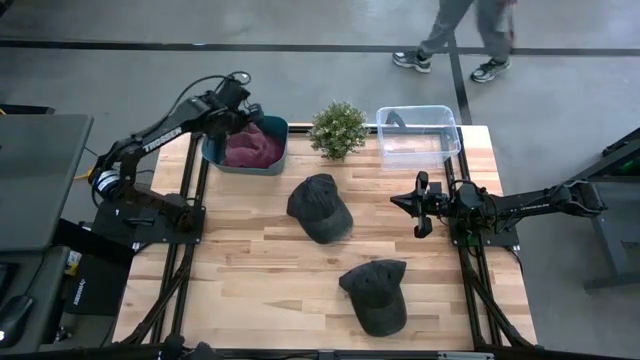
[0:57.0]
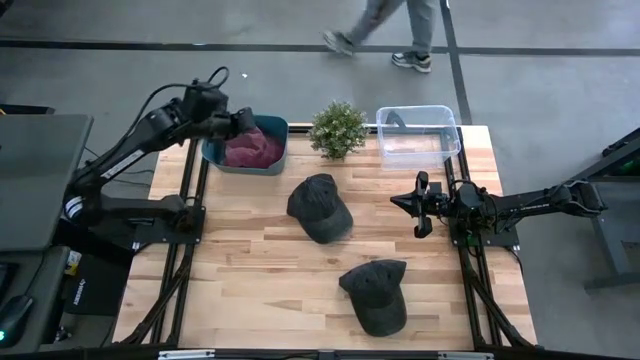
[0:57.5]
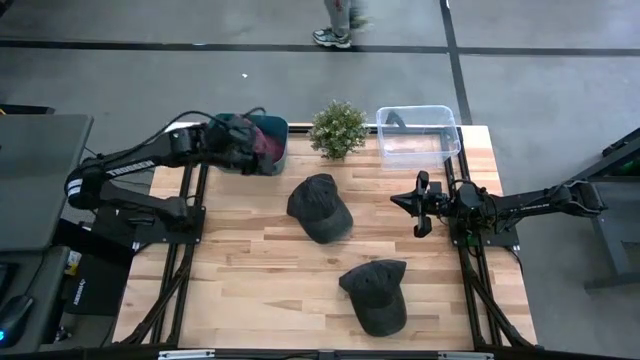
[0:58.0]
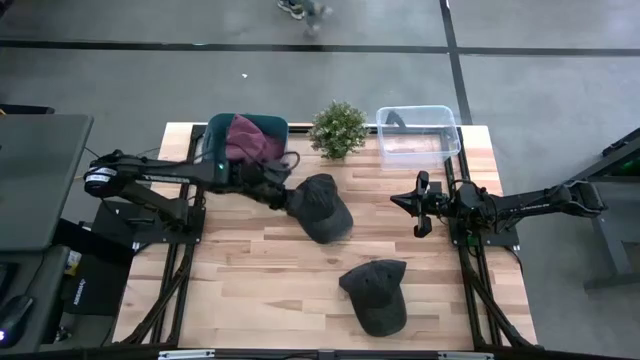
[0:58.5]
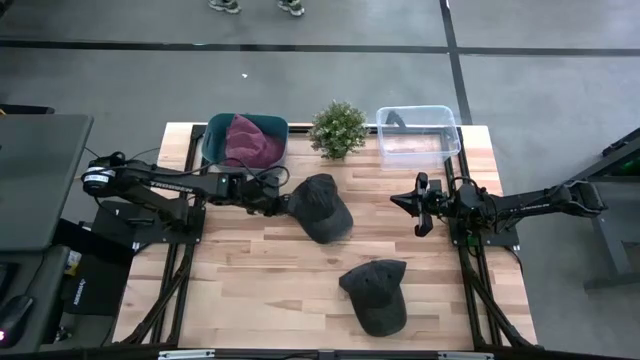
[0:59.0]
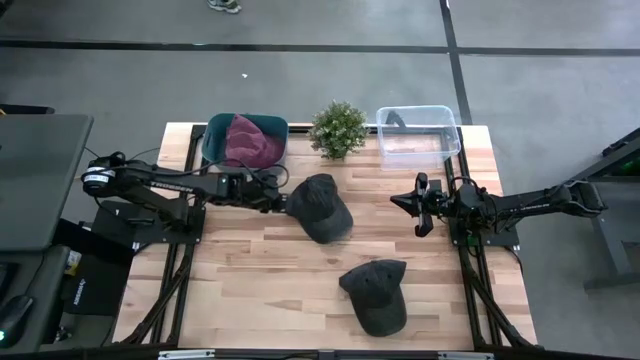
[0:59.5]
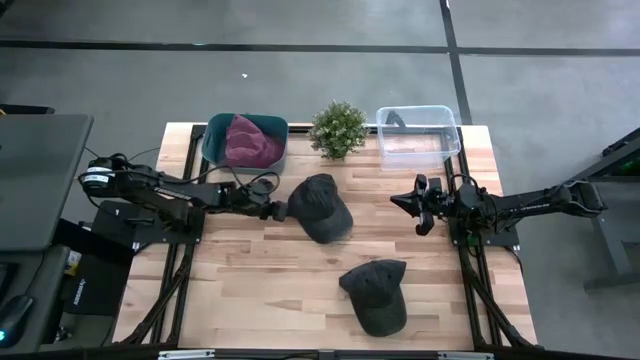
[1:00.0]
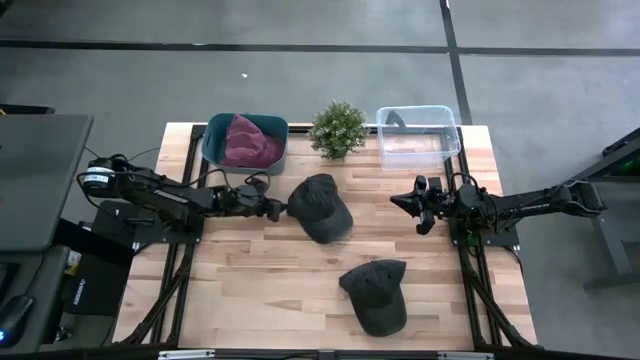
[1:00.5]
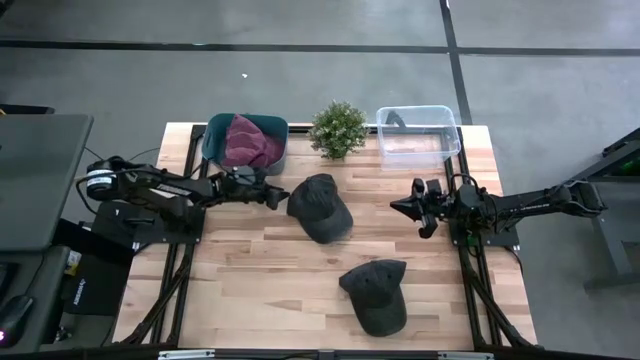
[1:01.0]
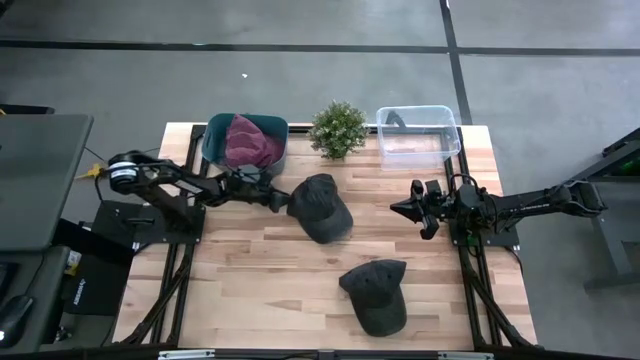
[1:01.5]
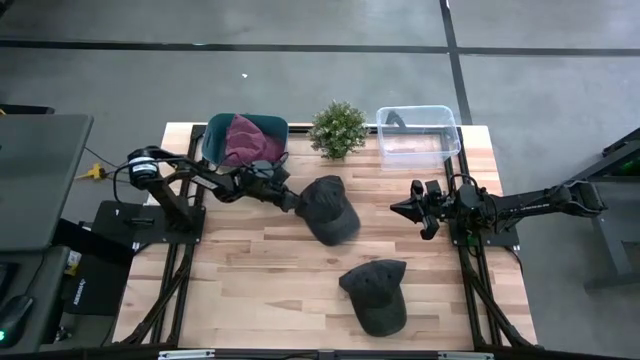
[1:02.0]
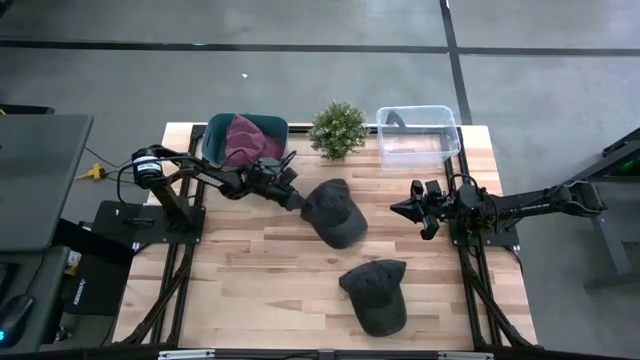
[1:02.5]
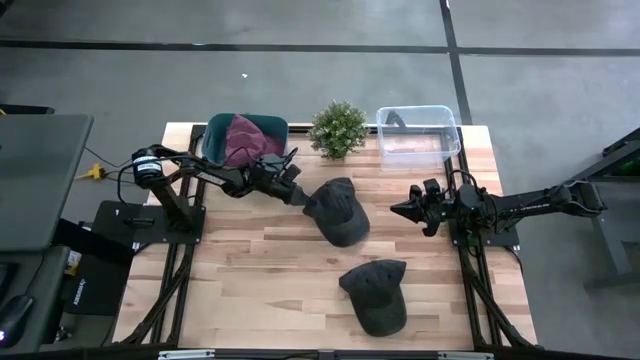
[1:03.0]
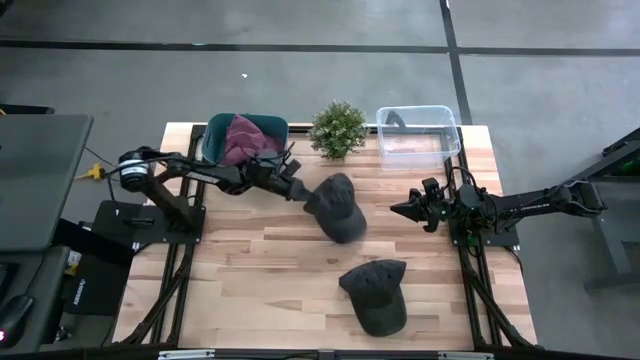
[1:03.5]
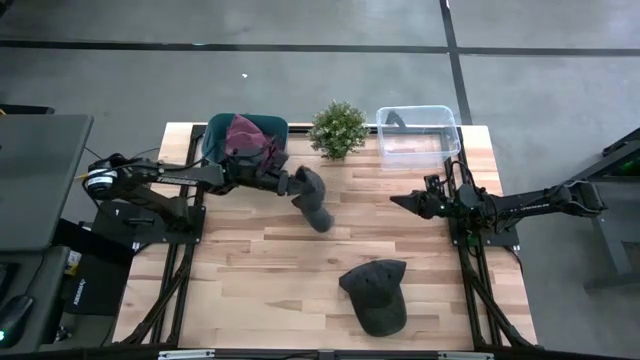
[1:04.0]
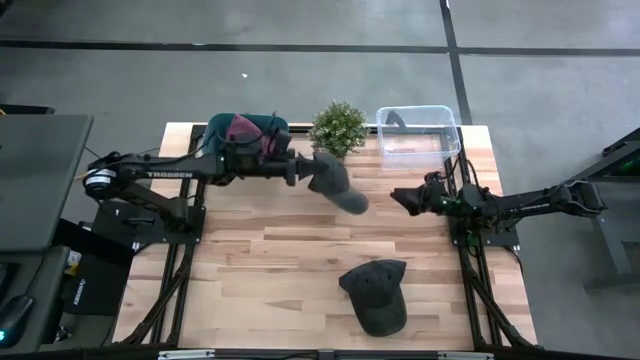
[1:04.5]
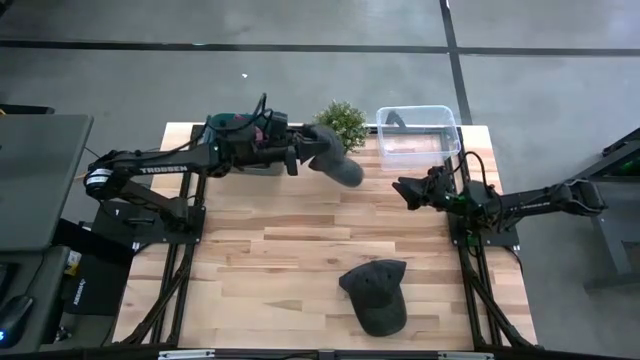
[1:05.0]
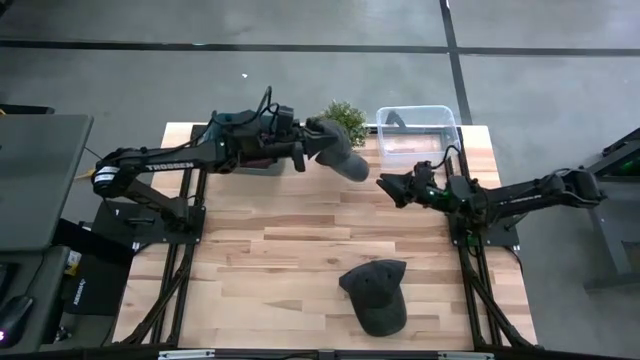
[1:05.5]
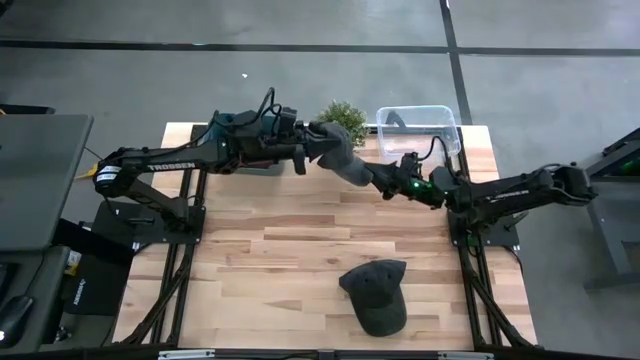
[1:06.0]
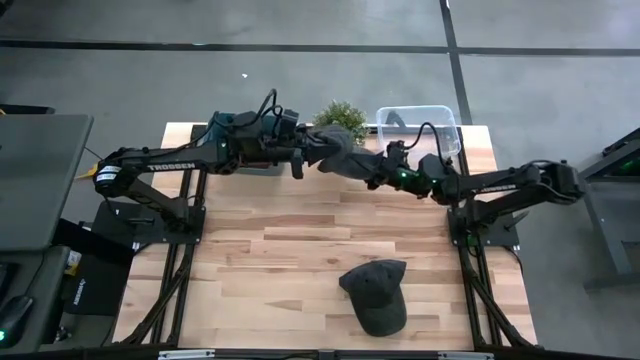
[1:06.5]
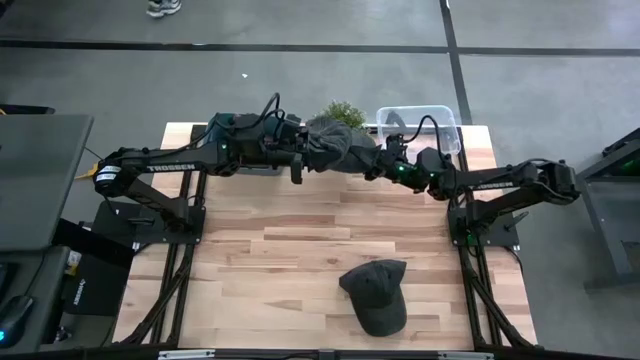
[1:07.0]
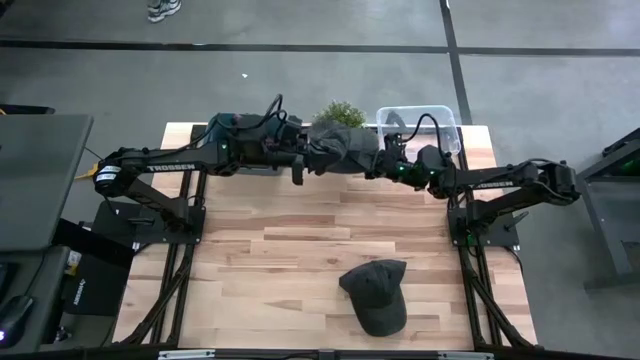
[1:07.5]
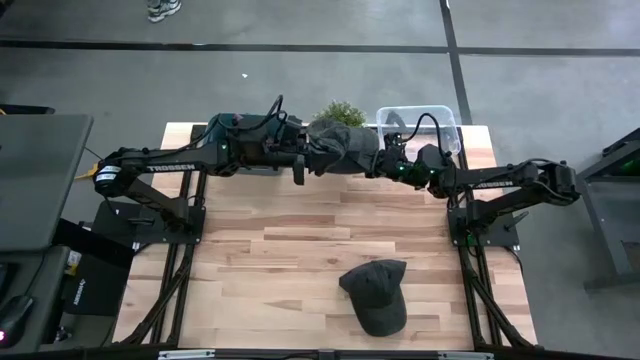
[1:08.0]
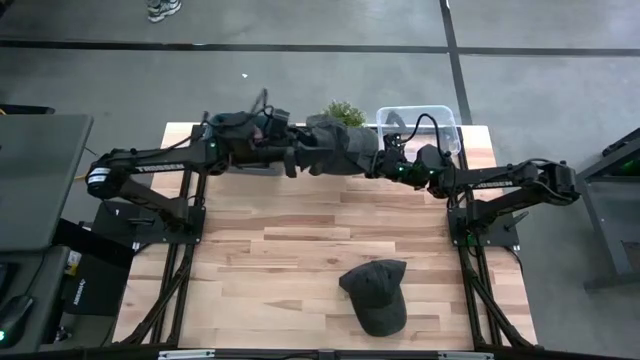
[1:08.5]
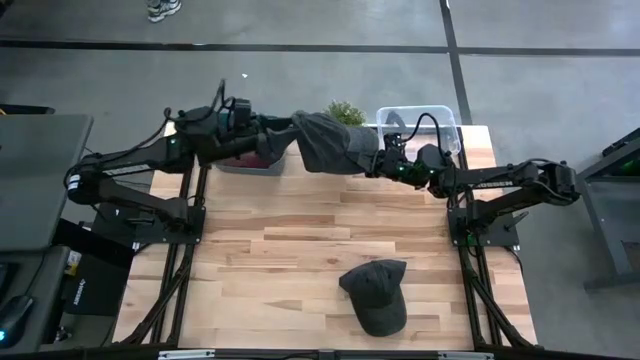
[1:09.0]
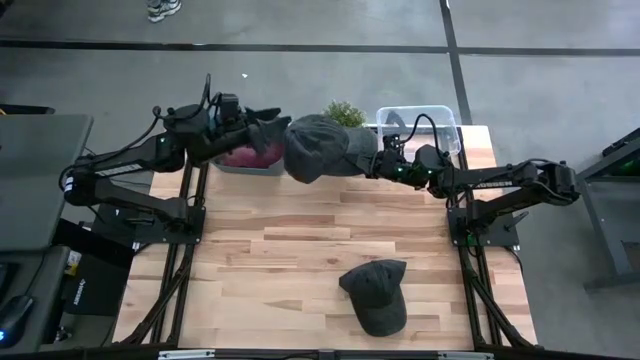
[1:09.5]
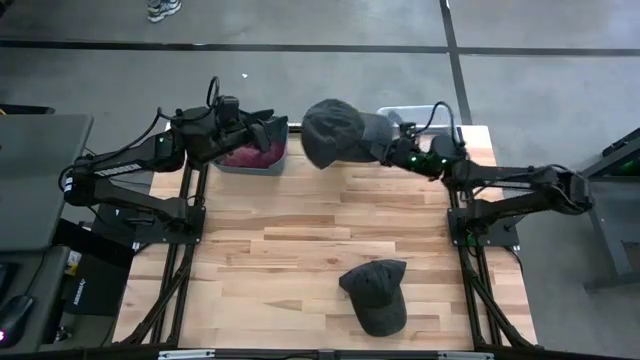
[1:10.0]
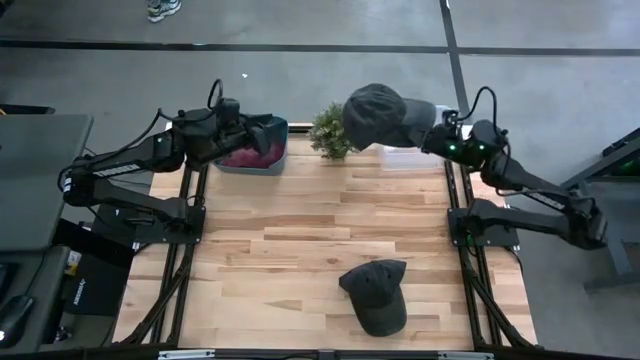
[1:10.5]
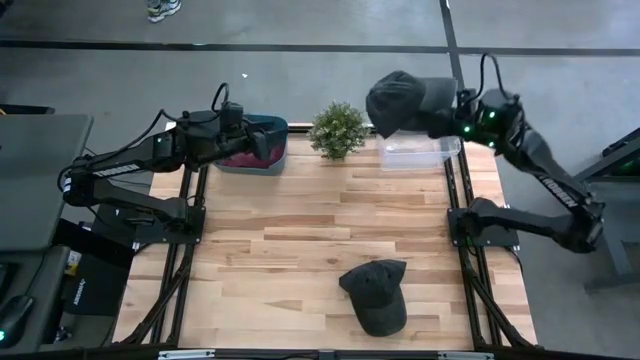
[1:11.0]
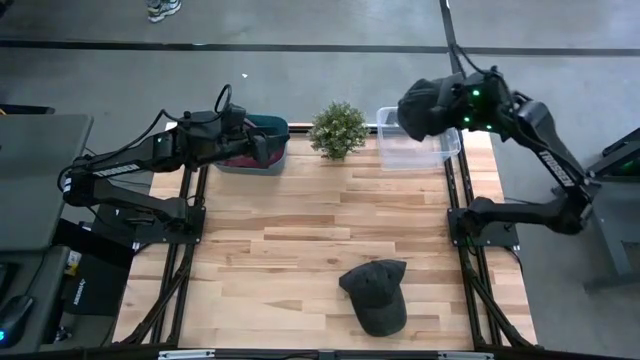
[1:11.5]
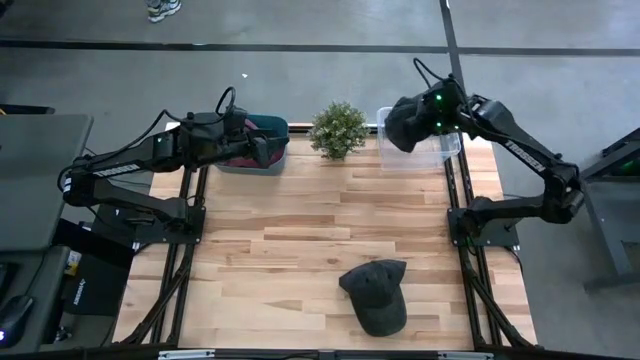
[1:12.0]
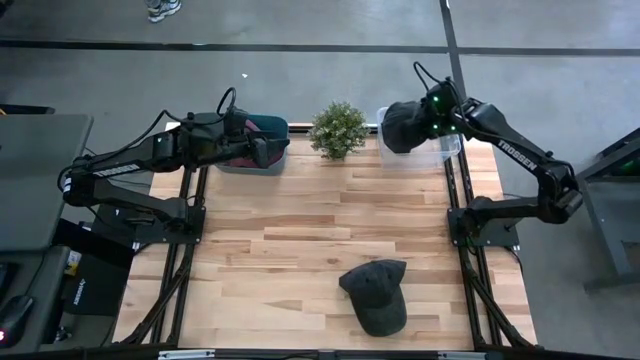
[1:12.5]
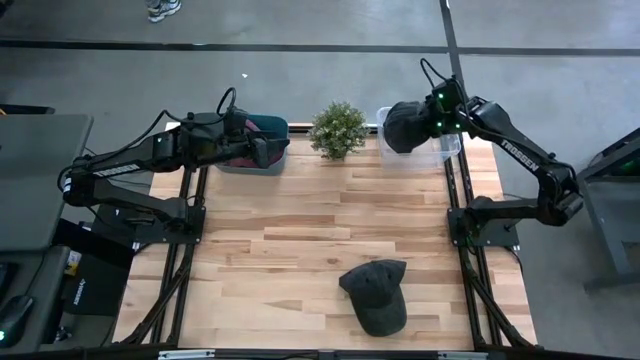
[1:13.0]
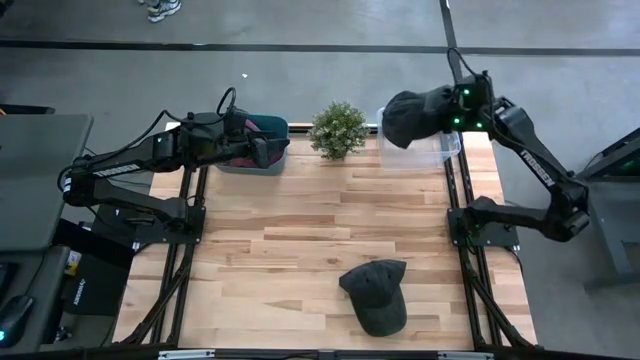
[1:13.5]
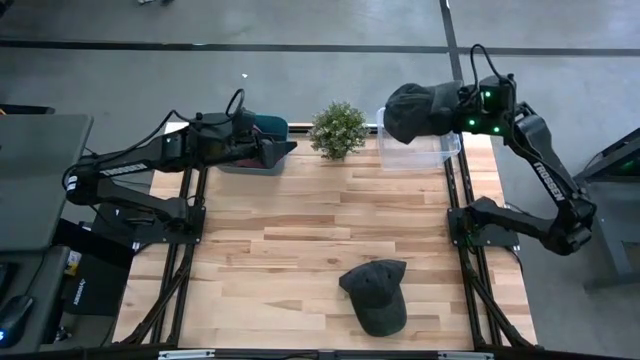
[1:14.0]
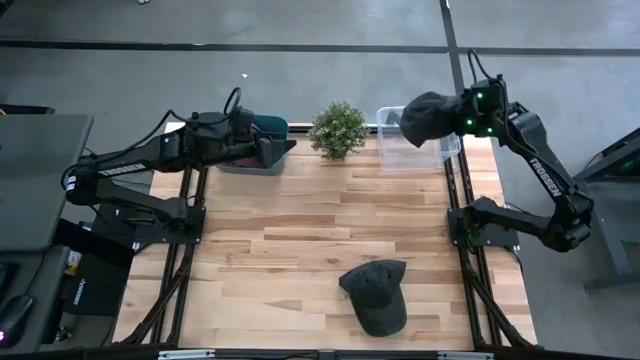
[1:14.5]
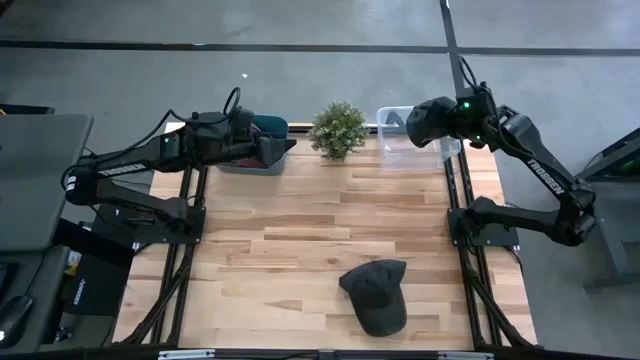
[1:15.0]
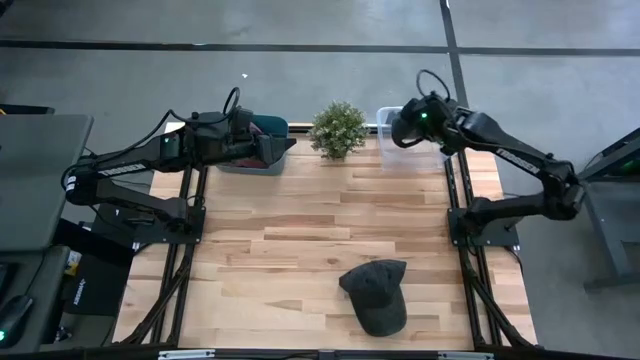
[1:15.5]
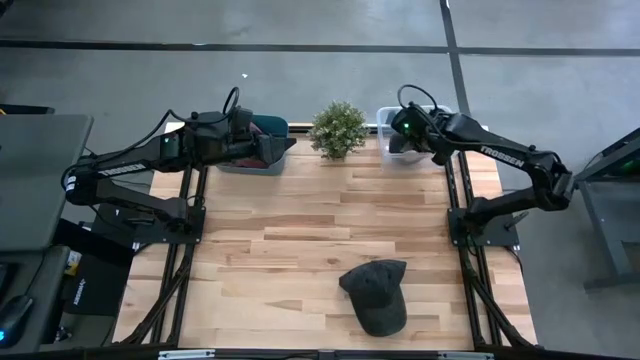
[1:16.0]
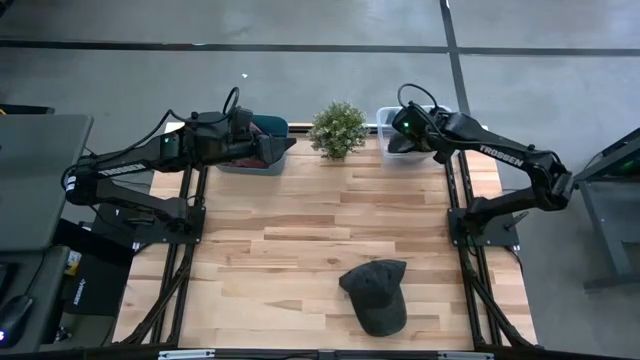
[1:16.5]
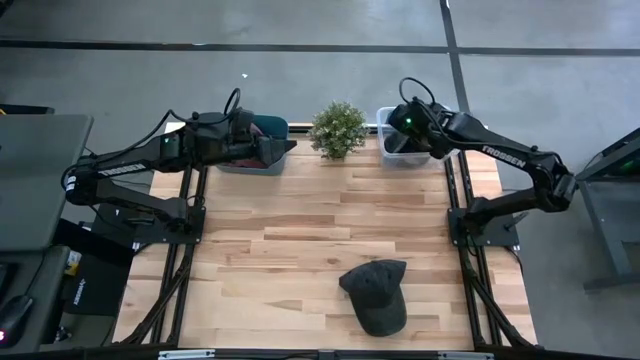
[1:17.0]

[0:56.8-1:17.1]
Task: Pick & Place hat
Put the top black cap into the transparent bin

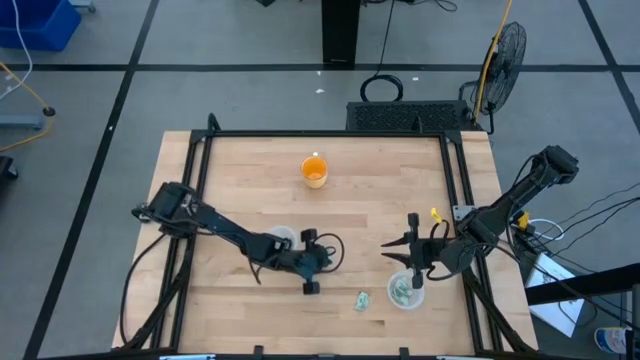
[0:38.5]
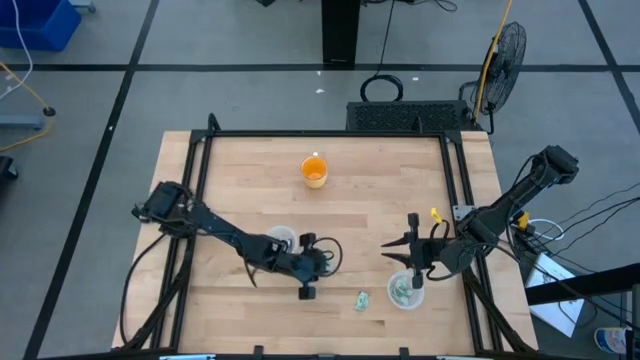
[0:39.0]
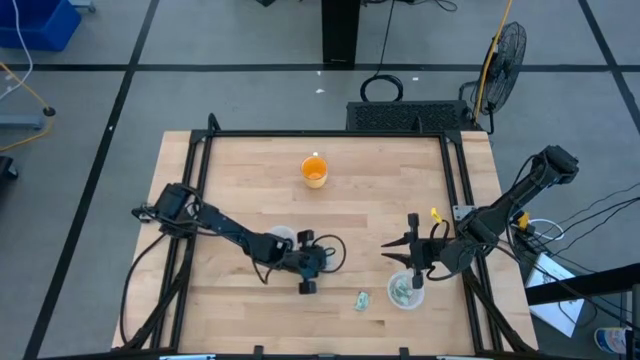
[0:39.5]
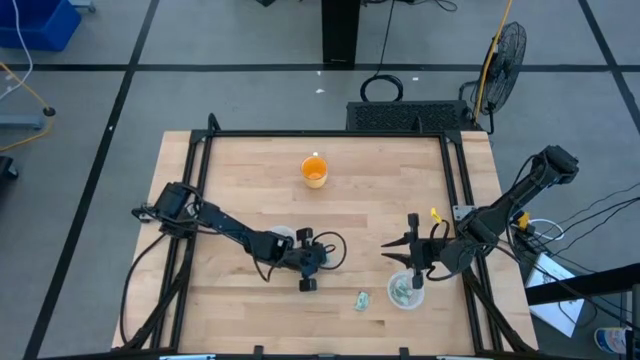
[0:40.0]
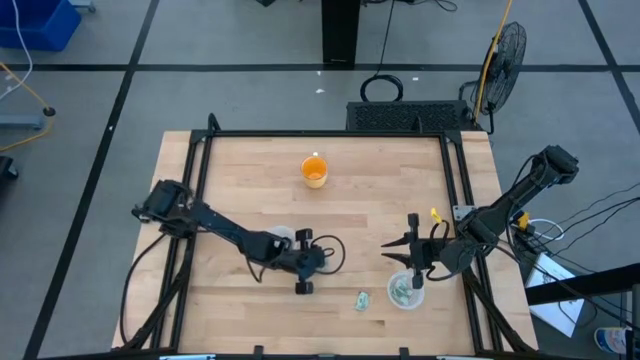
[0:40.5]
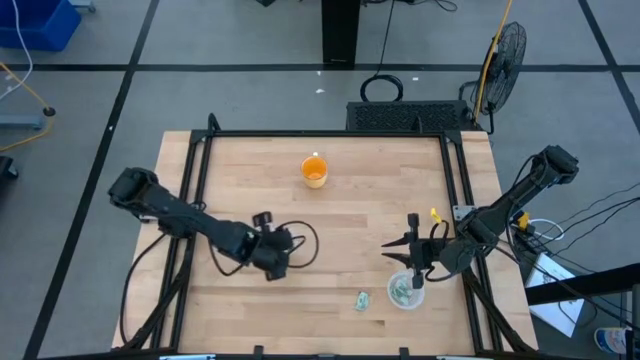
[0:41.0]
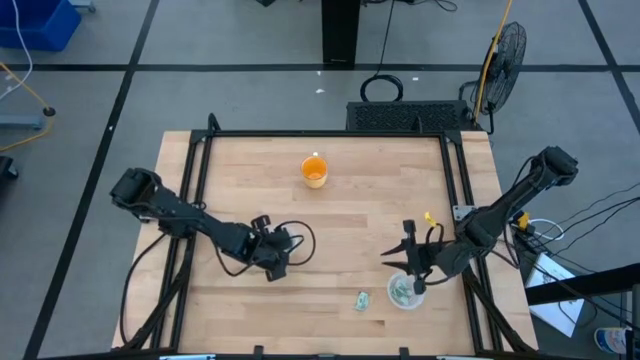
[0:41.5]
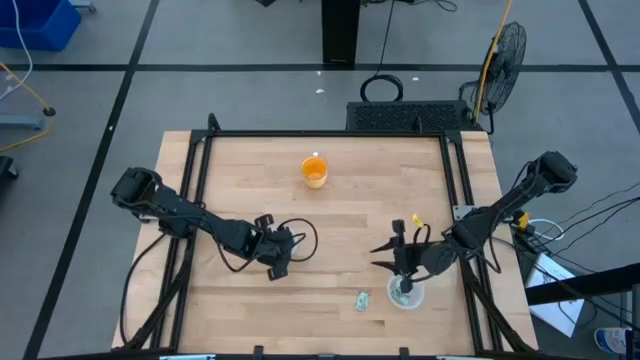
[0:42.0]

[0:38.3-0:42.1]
Task: Pick and place Stevia / Truvia into bins
Put the white stevia packet into the top transparent container
